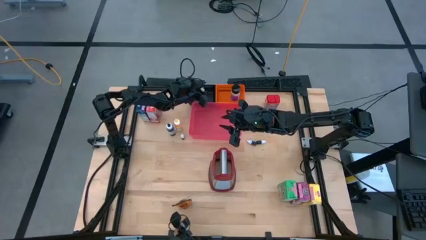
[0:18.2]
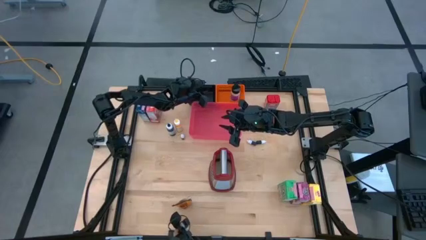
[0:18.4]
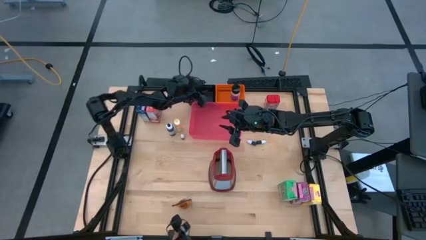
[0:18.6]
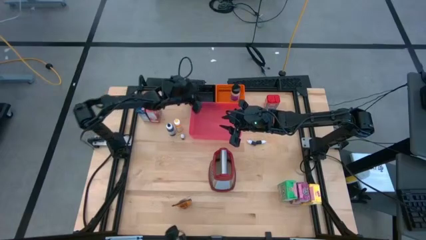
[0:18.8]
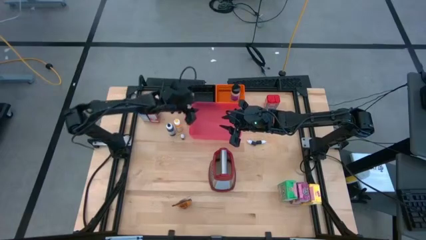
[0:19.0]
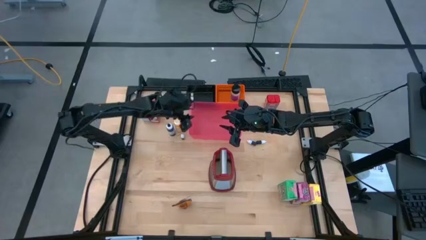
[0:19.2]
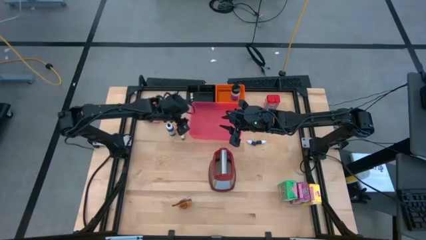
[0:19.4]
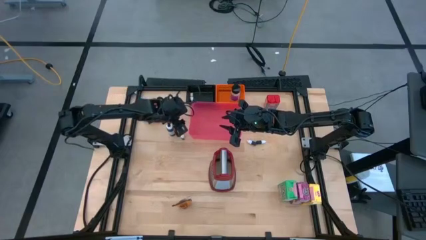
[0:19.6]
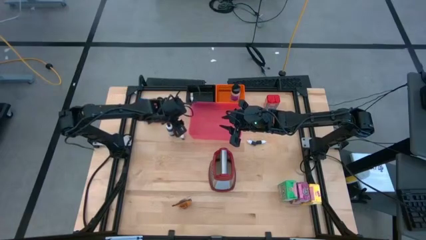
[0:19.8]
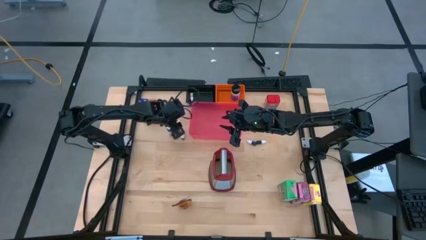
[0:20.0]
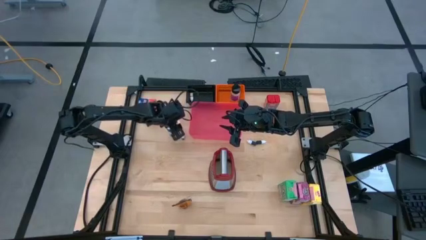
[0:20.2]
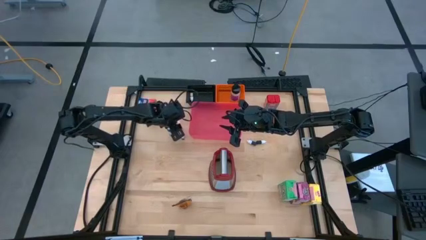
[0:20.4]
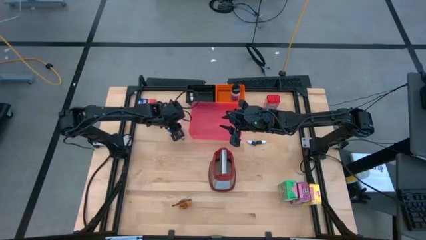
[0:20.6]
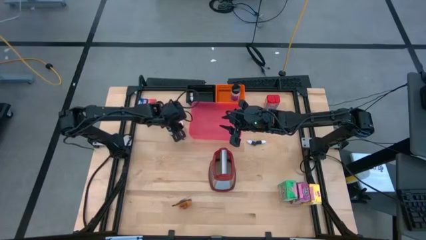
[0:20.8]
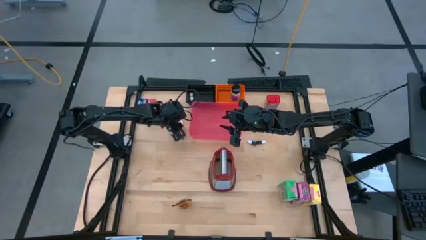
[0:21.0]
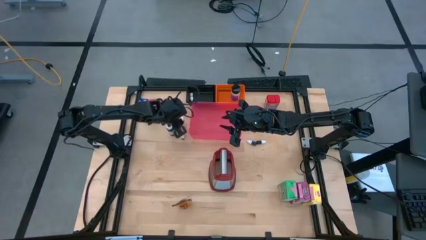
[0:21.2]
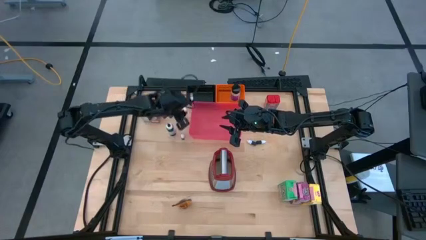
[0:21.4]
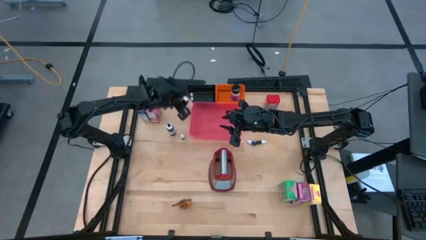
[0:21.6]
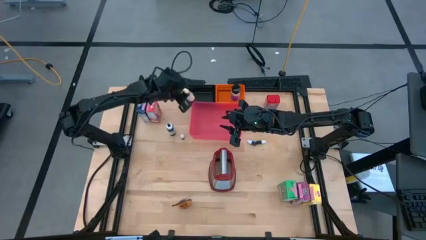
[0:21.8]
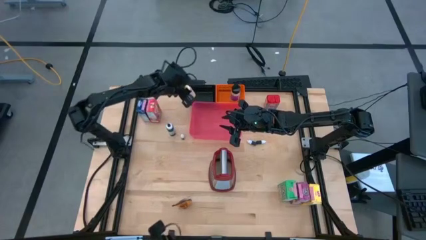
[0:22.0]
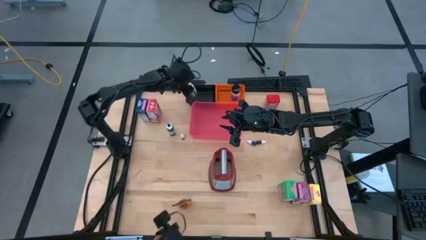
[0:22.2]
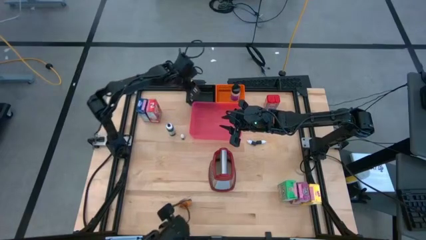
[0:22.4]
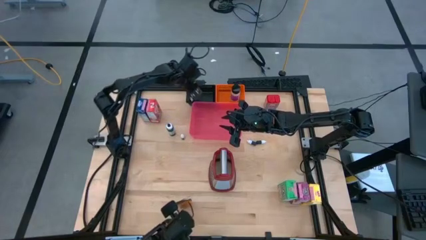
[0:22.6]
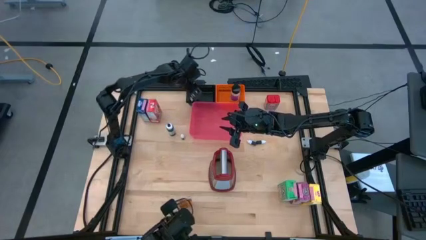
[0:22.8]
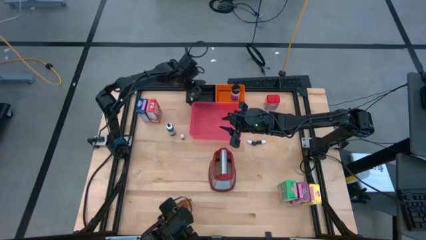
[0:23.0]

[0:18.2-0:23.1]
Task: Pick & Place Kitchen Items
Put the large yellow food coloring bottle into the black basket

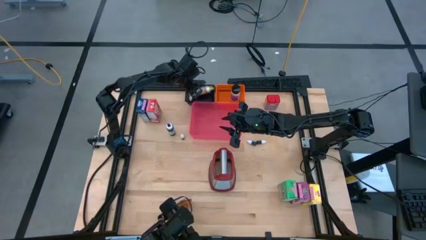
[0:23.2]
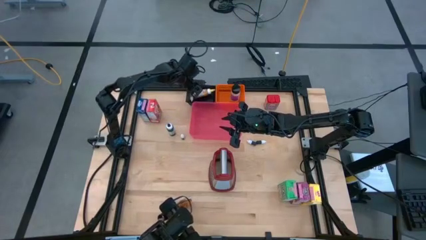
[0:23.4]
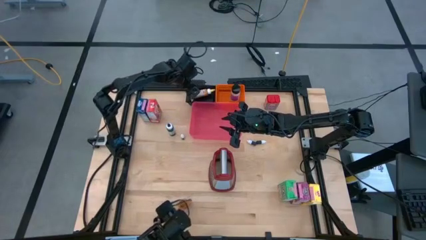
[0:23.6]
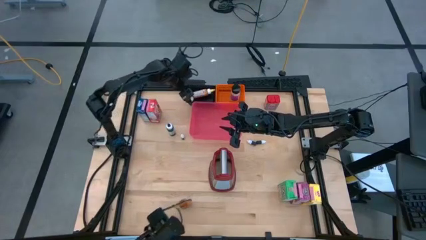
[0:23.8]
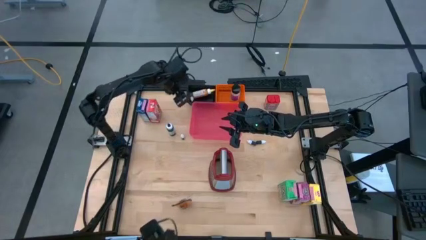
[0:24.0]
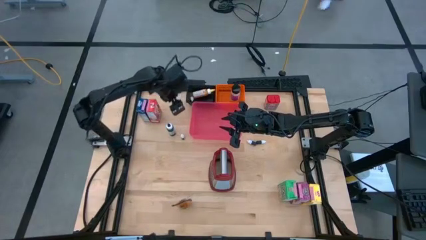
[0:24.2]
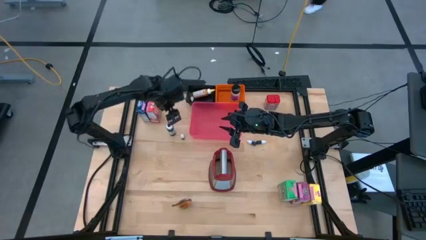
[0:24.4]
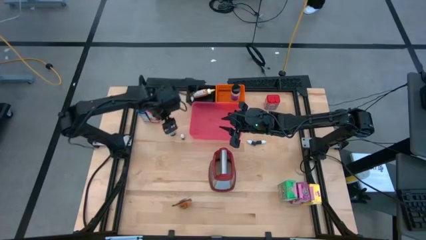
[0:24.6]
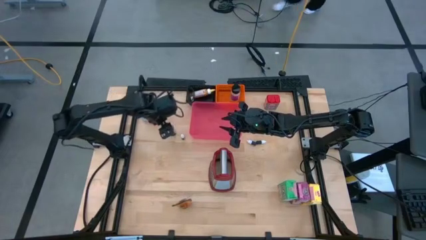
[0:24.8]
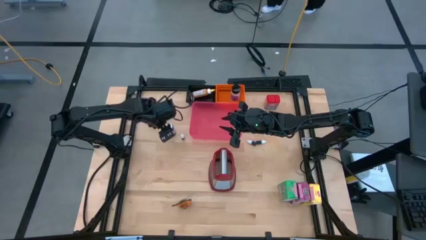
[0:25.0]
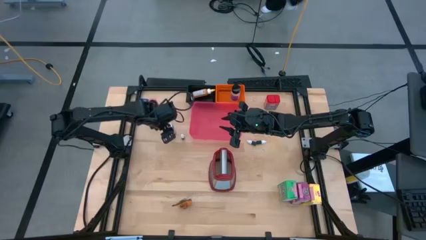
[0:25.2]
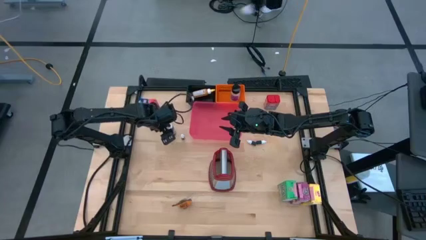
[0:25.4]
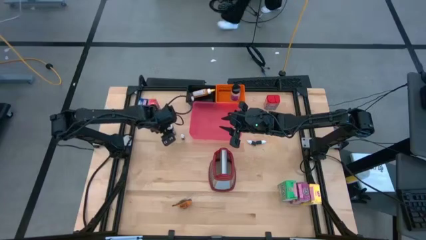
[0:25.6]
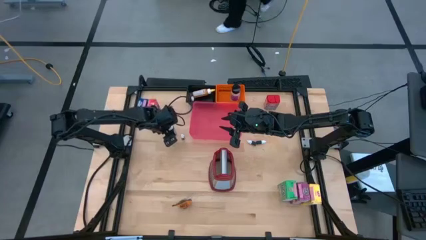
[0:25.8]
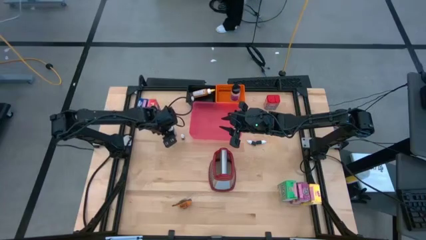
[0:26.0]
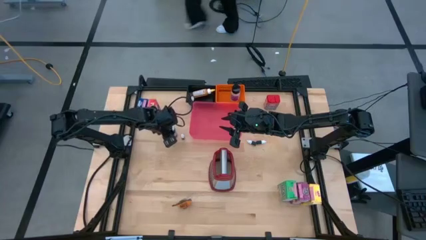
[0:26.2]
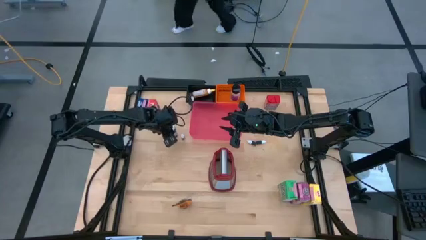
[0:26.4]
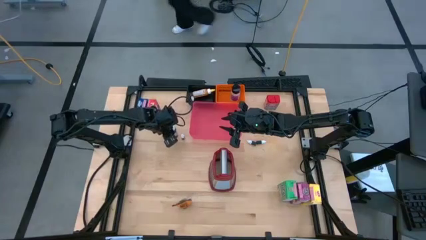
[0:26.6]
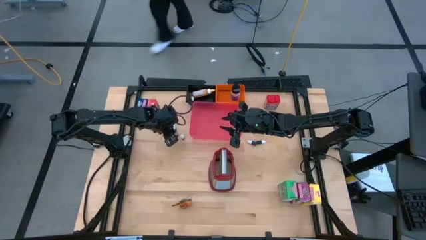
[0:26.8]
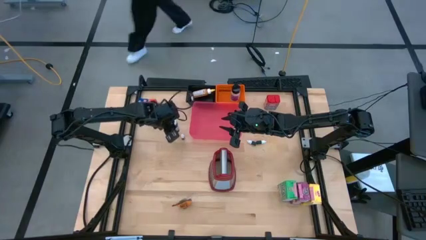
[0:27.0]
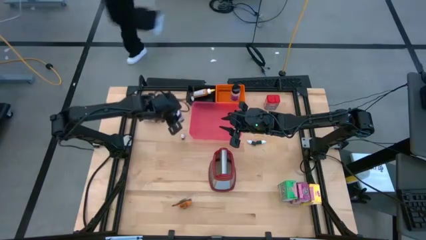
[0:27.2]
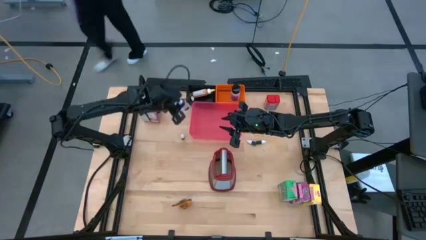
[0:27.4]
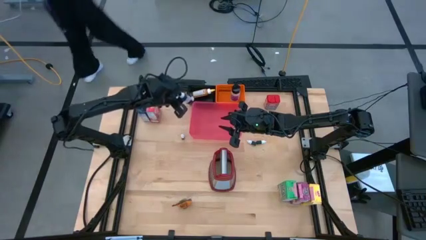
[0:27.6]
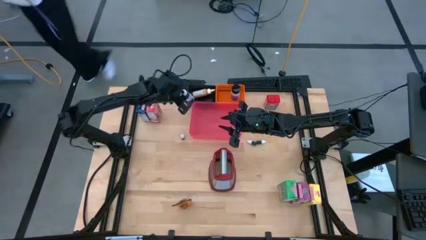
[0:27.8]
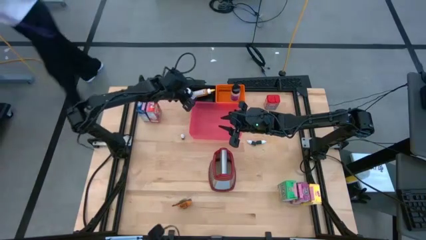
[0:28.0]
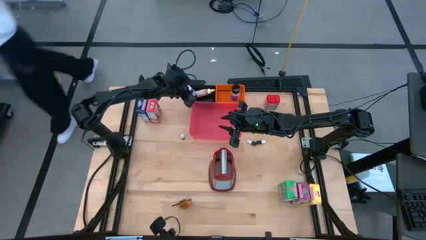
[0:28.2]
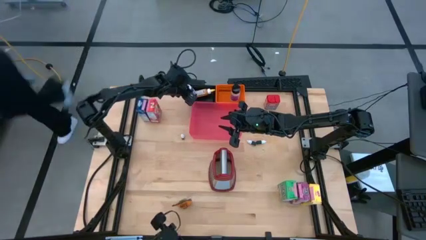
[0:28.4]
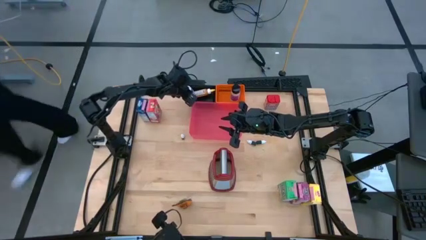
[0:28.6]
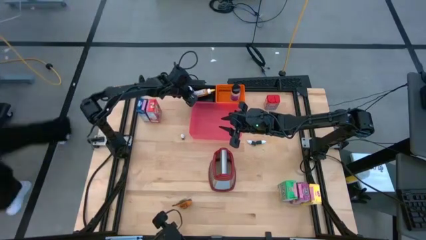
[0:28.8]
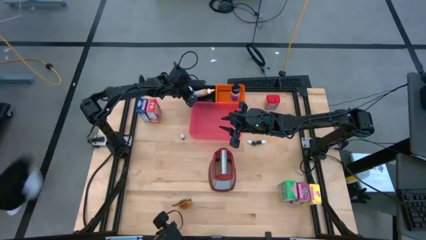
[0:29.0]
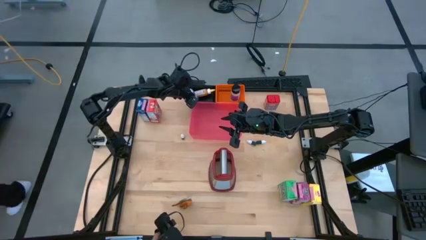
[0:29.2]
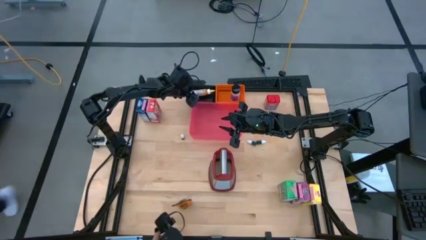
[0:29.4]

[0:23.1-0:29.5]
Put the large black food coloring bottle into the black basket

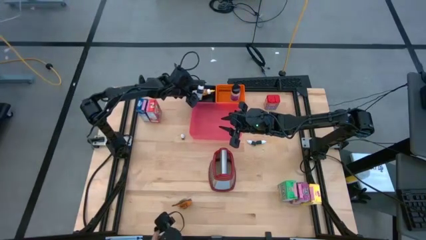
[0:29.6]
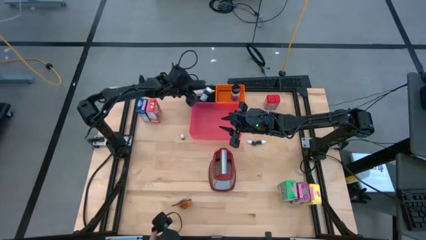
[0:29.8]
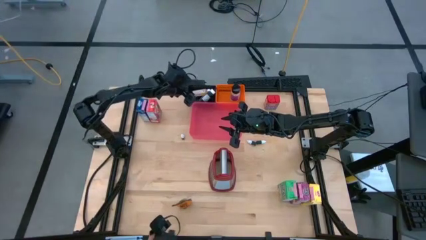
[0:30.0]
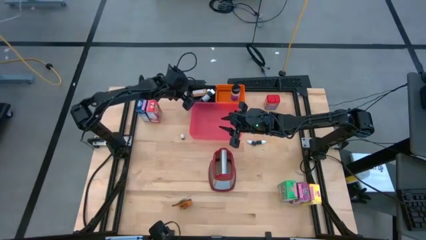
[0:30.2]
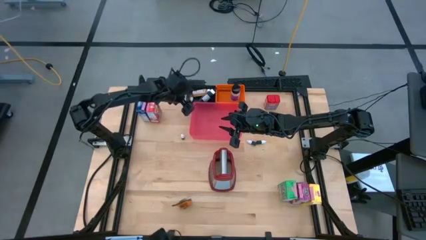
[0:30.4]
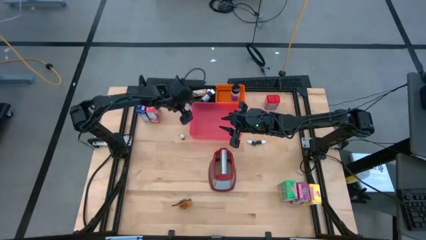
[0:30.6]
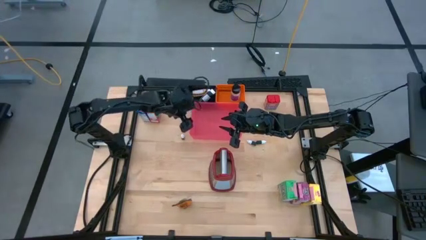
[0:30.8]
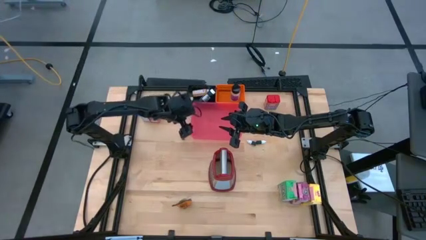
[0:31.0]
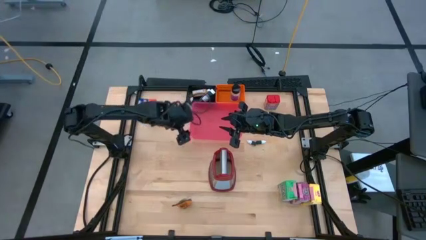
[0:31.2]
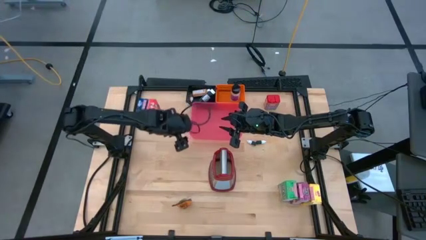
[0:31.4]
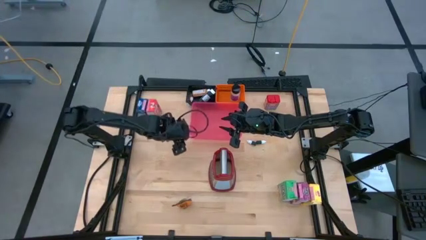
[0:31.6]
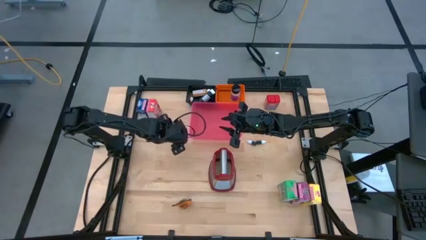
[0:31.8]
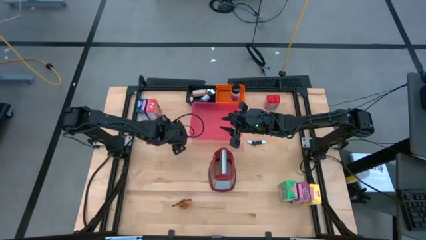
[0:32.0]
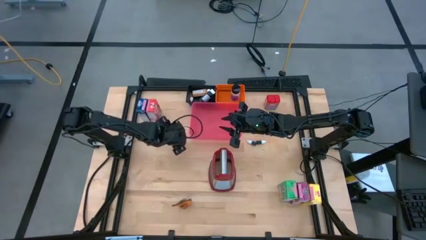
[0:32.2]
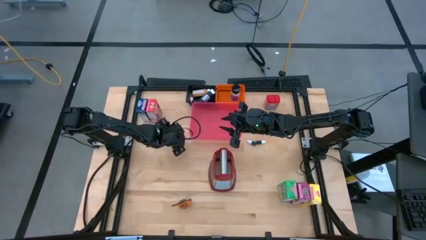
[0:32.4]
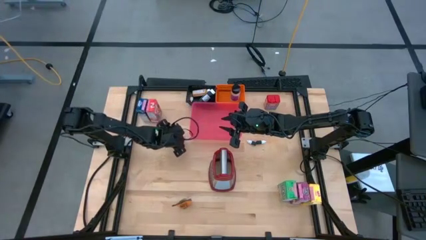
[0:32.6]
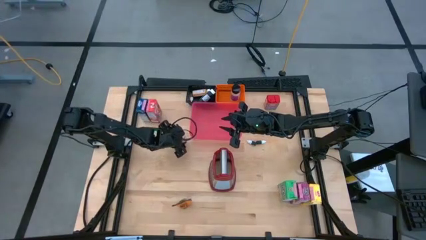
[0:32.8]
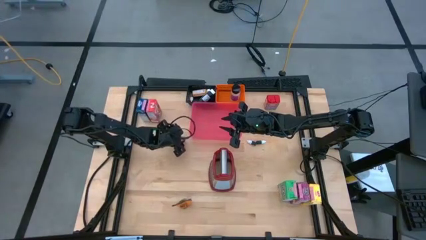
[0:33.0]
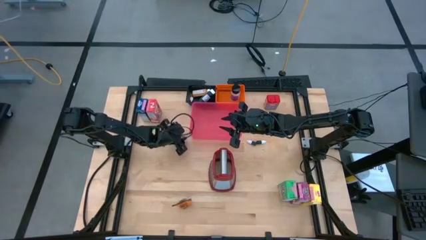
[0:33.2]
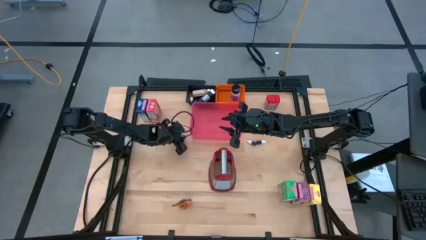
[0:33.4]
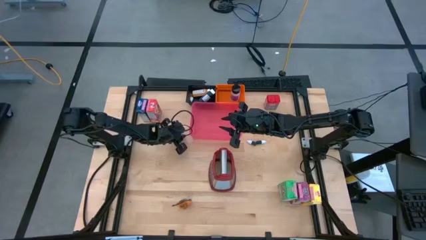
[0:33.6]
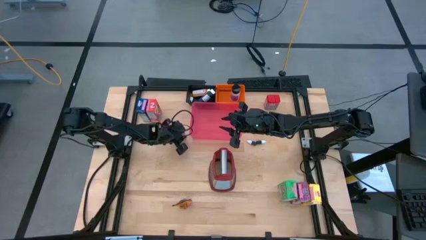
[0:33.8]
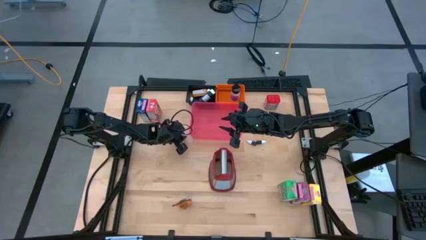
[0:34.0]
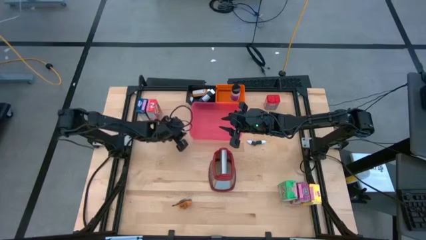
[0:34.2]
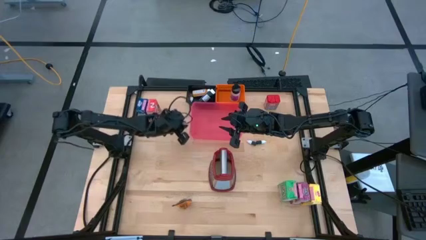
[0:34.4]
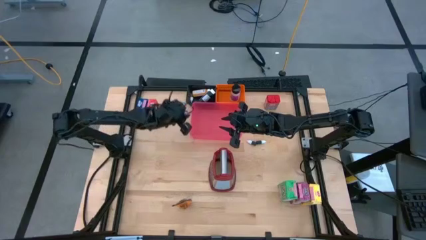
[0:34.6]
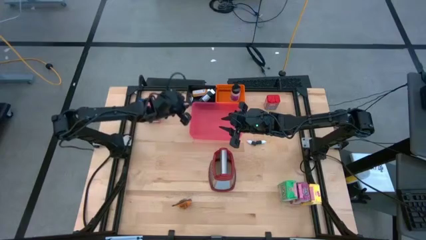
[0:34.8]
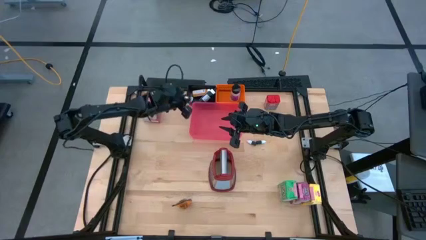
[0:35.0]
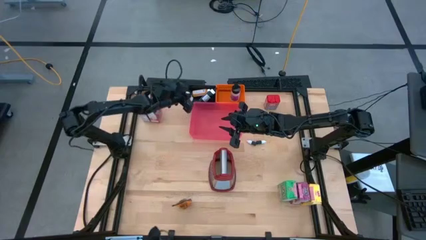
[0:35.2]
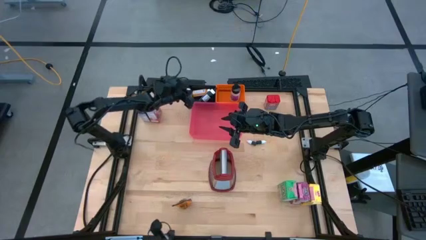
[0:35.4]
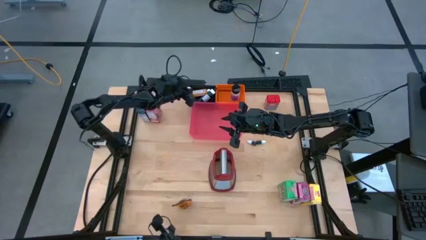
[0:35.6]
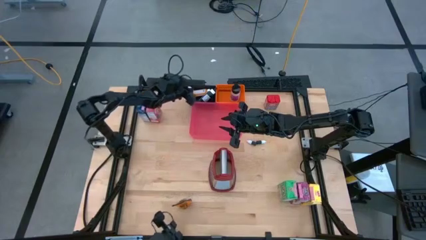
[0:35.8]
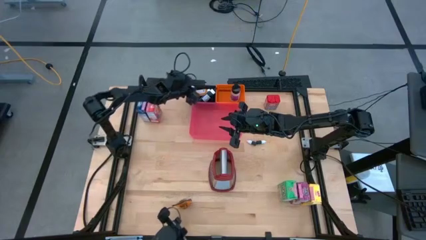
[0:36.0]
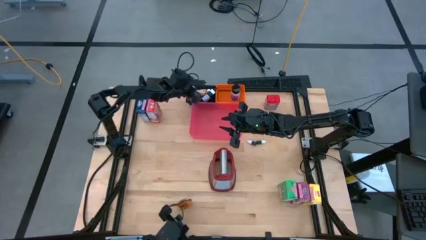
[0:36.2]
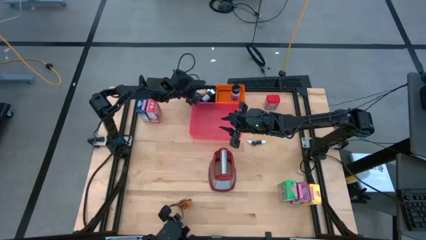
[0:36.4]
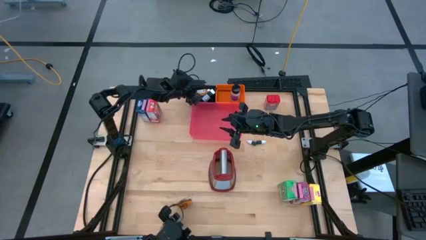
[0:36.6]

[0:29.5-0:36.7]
Put the small yellow food coloring bottle into the black basket
